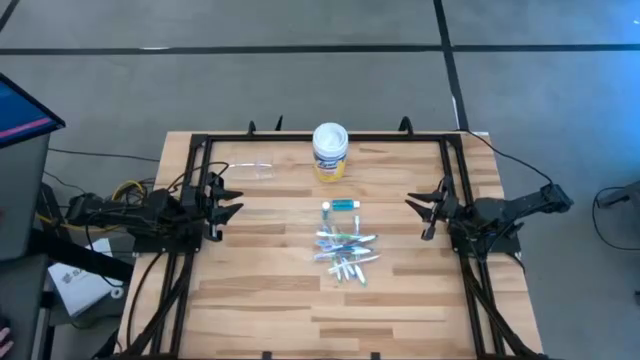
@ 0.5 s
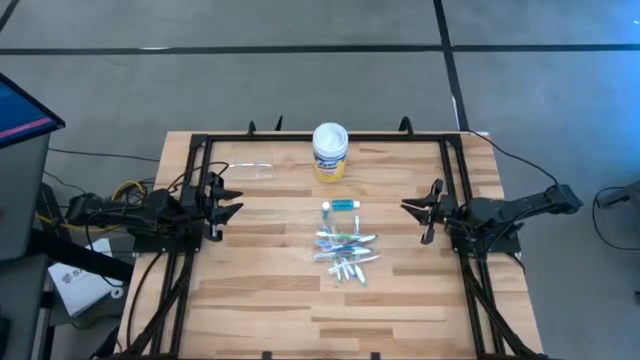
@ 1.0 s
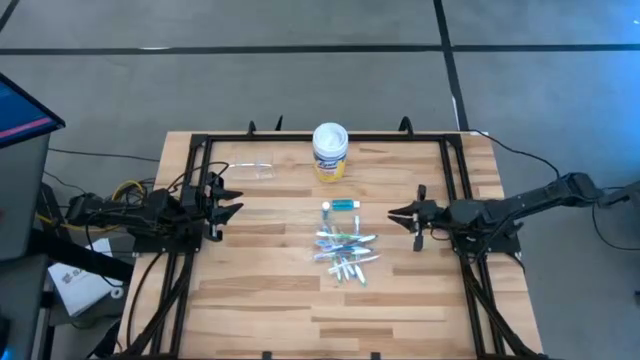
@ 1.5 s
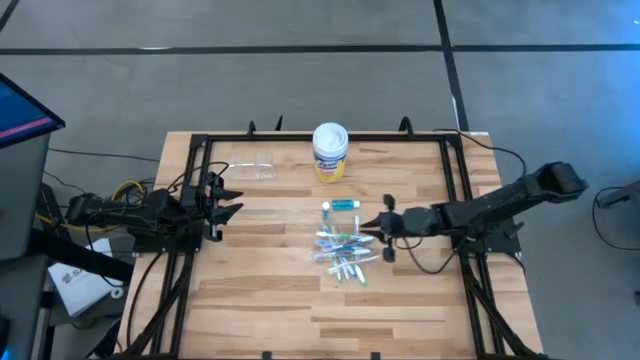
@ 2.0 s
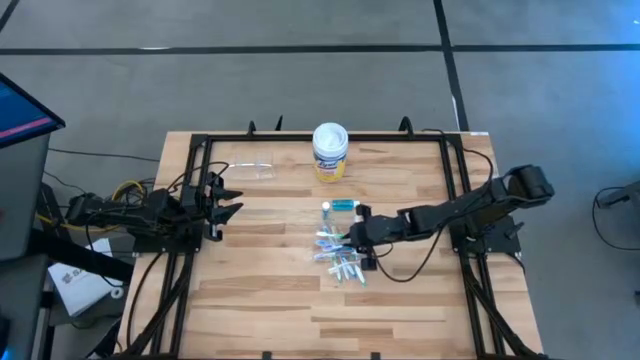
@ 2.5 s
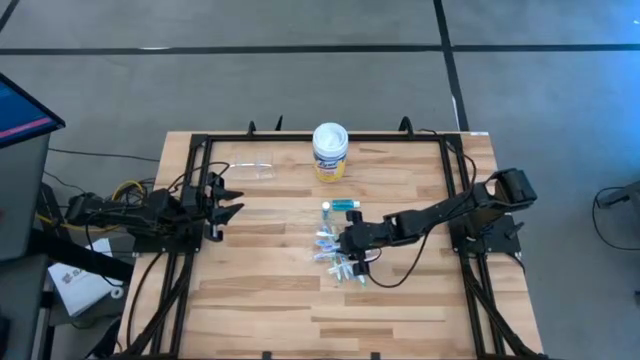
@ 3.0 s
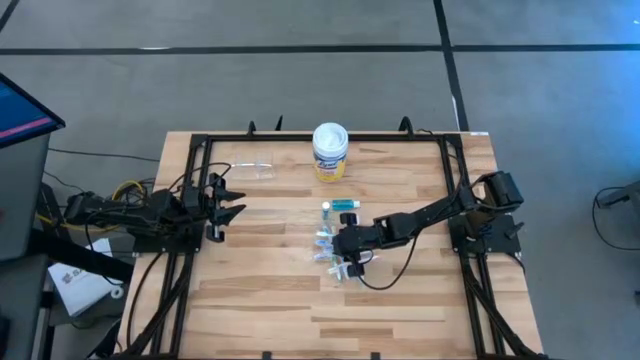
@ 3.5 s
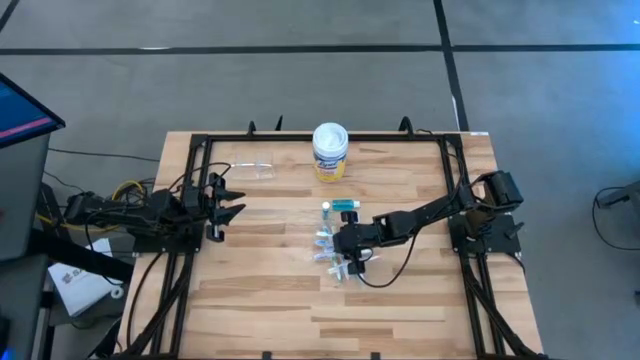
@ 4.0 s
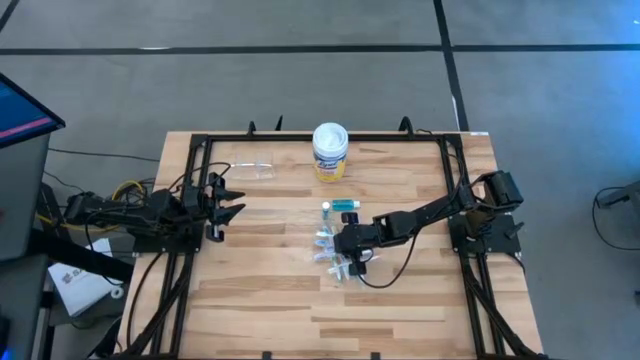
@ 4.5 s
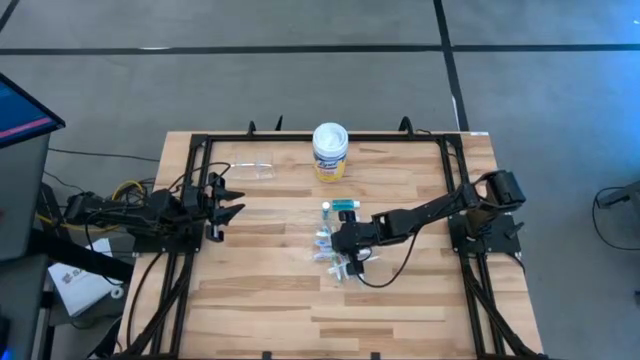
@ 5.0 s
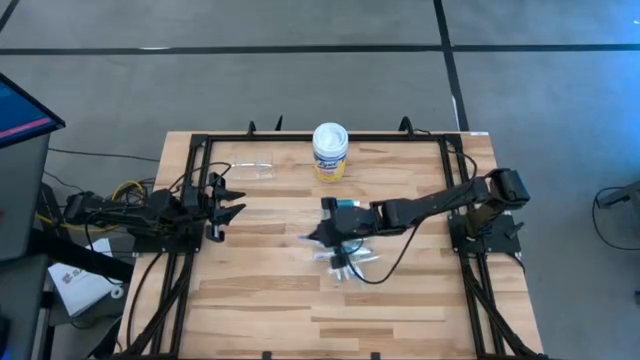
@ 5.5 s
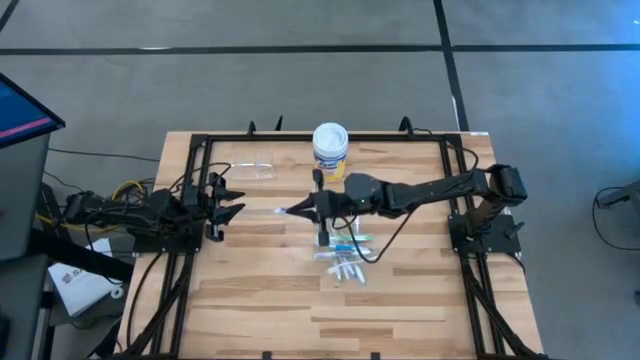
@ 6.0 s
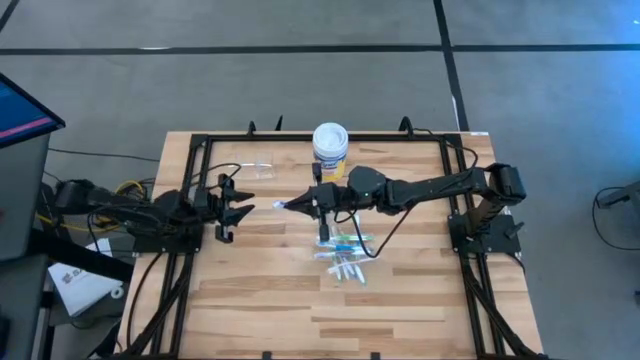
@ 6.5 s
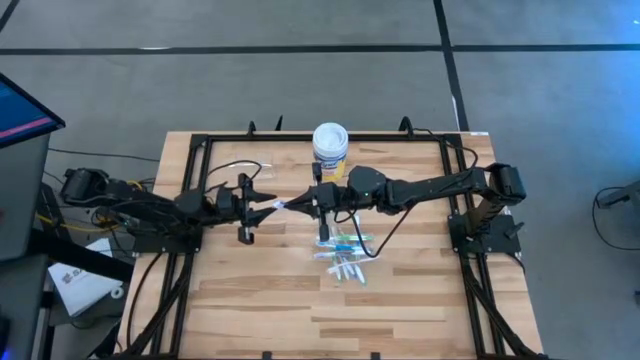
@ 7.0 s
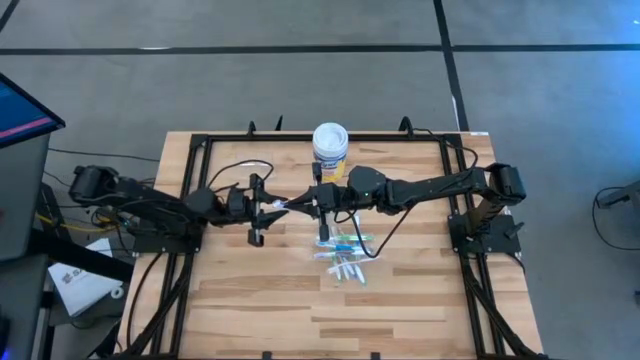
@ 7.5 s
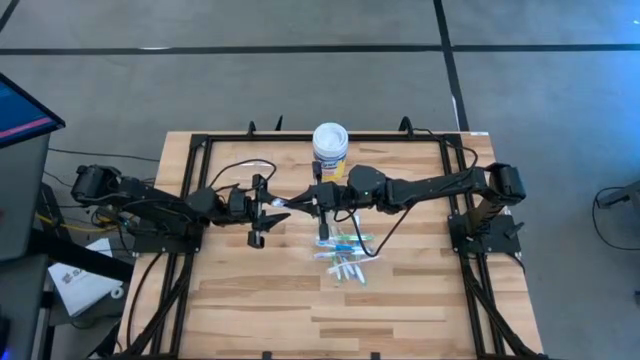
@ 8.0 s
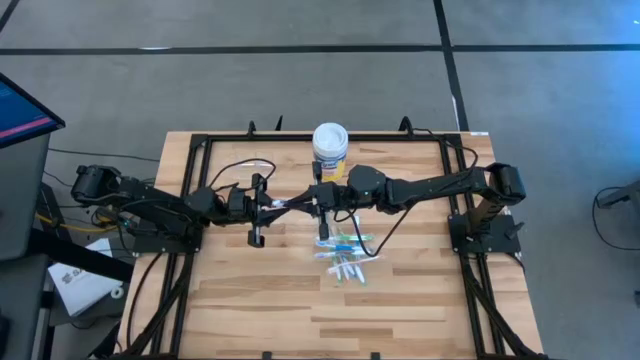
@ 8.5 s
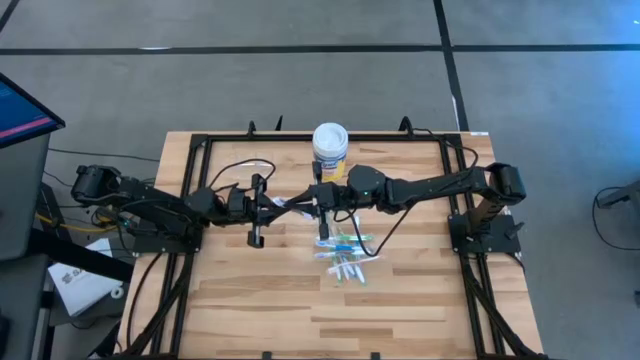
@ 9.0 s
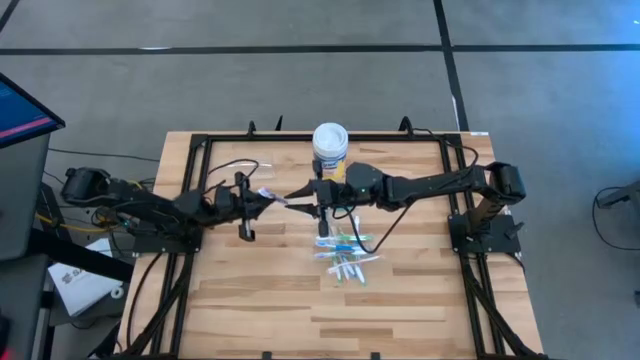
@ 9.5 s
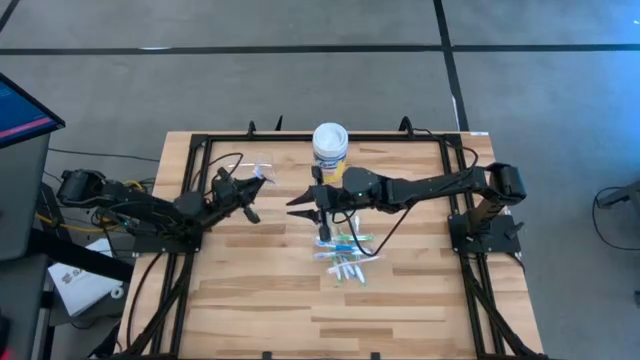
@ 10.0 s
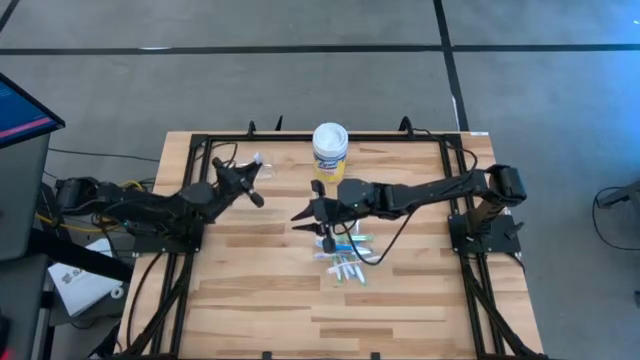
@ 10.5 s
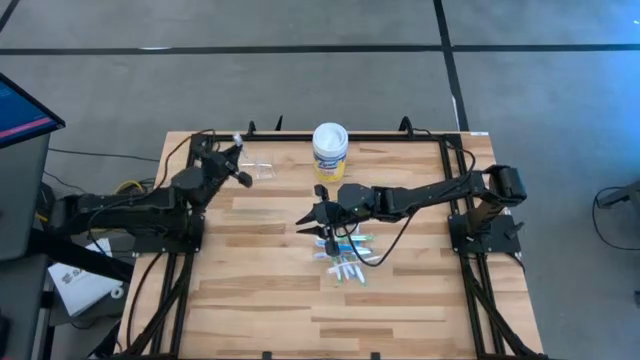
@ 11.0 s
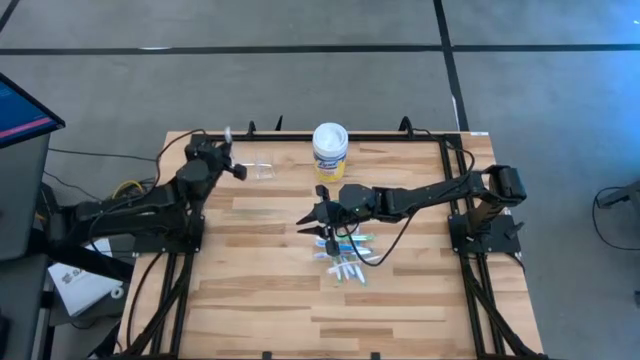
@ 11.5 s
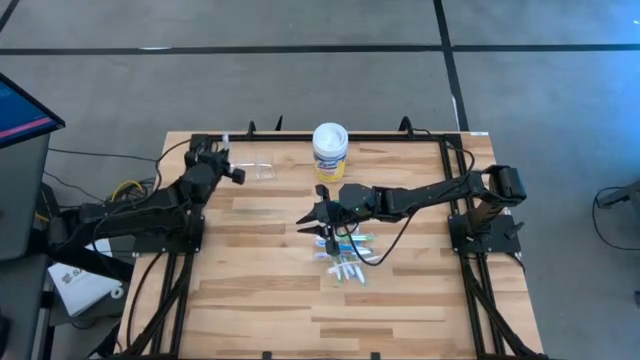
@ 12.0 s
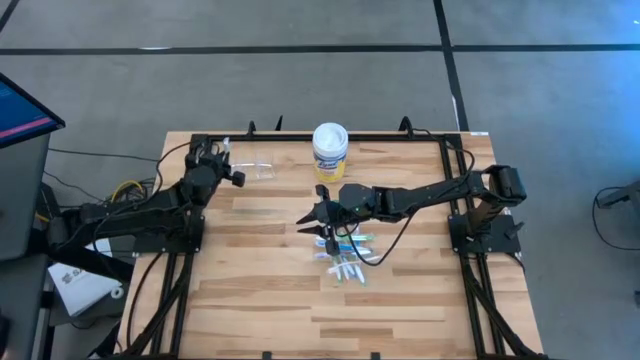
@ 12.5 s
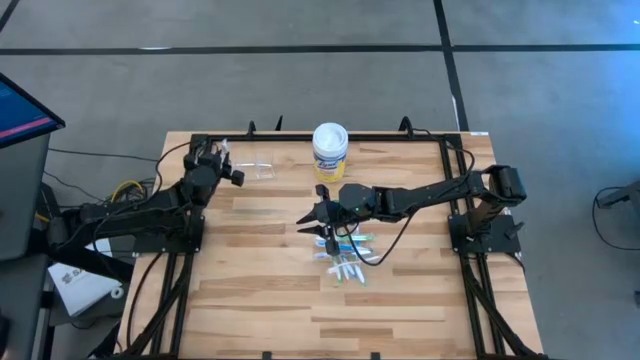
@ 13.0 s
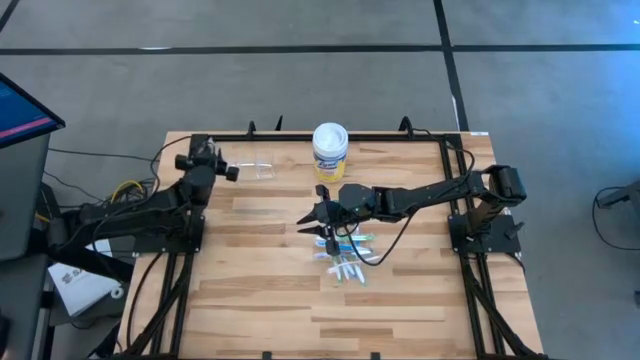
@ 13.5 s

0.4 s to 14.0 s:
Task: Pick & Place toothbrushing station
Put the violet toothbrush into the transparent organizer

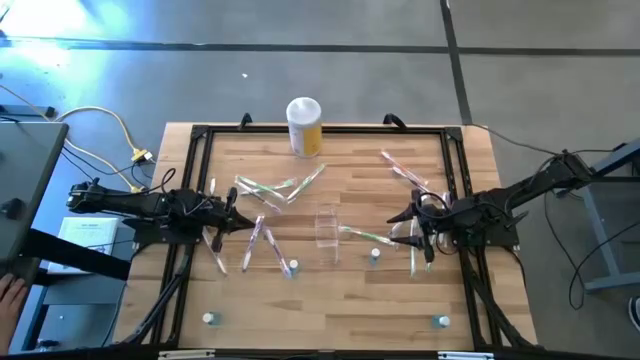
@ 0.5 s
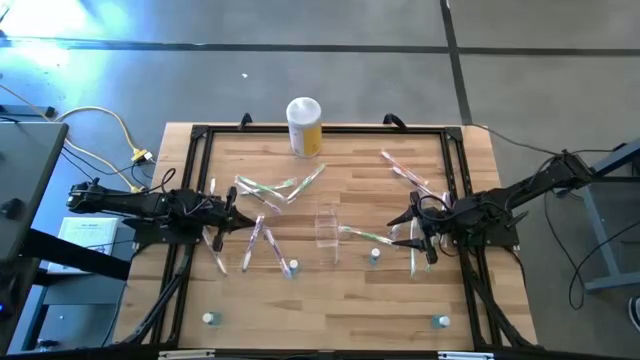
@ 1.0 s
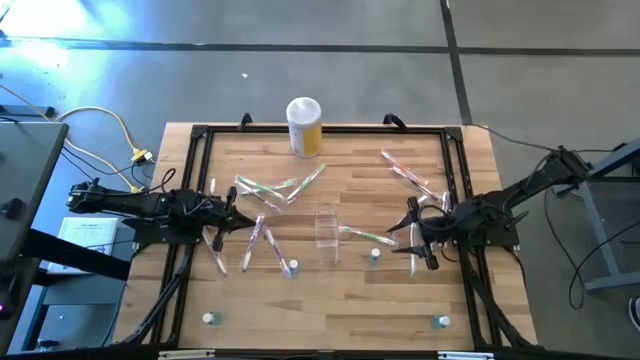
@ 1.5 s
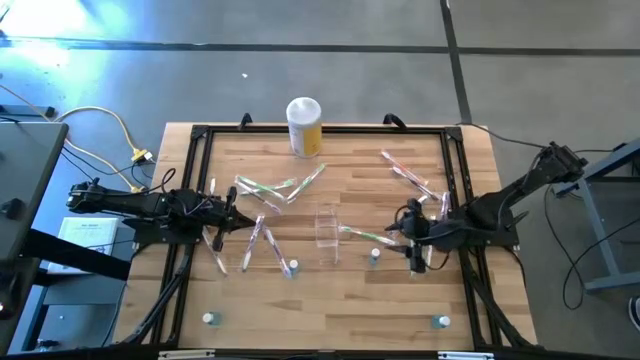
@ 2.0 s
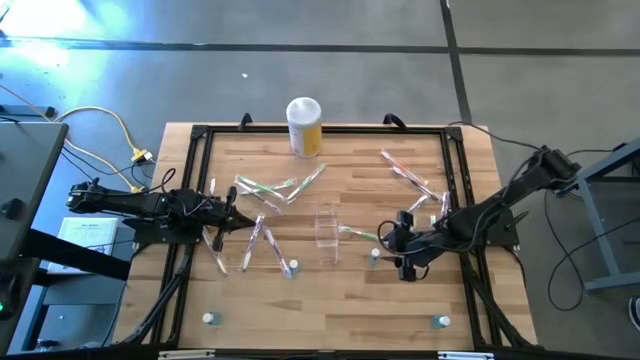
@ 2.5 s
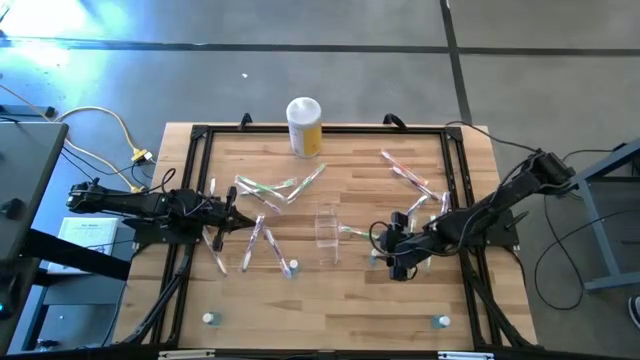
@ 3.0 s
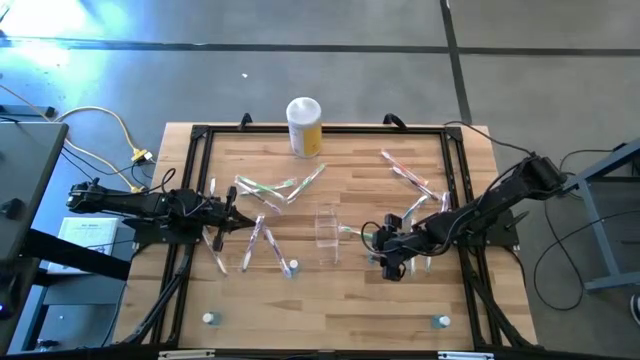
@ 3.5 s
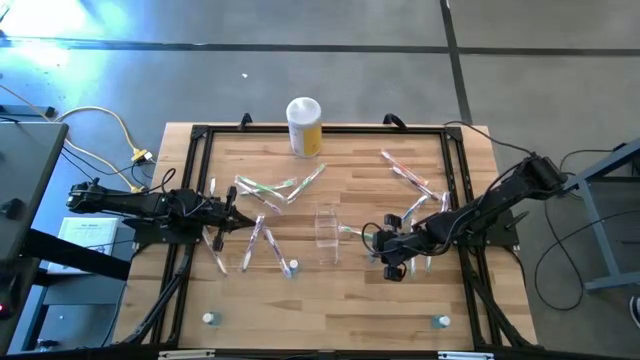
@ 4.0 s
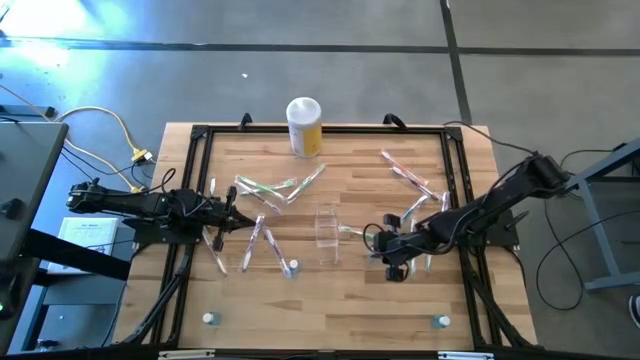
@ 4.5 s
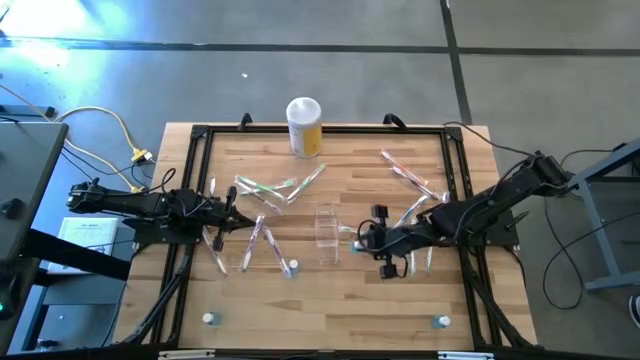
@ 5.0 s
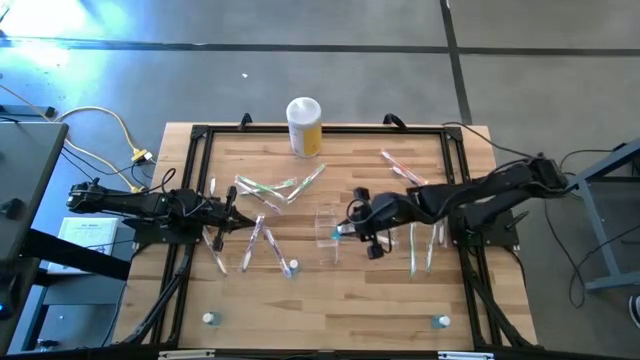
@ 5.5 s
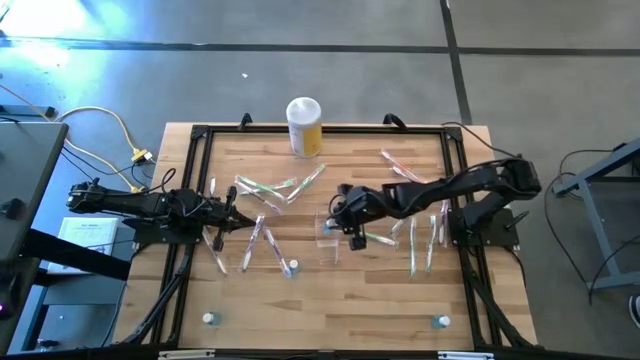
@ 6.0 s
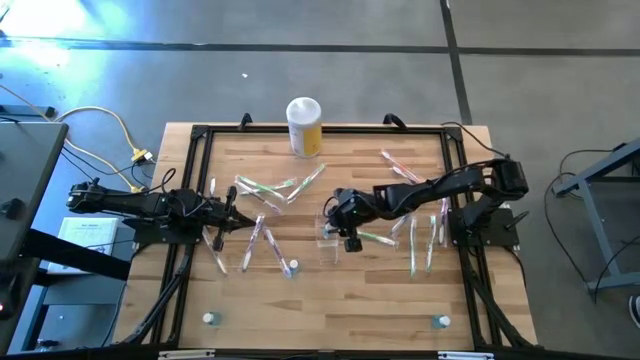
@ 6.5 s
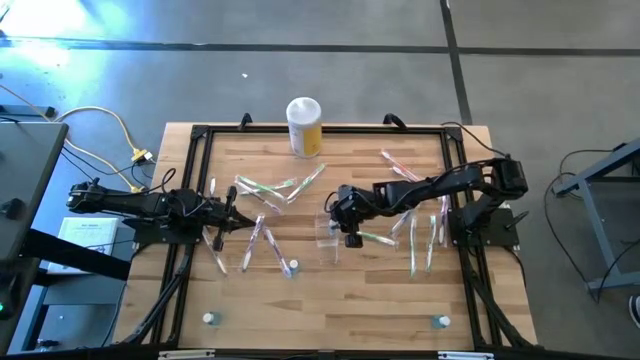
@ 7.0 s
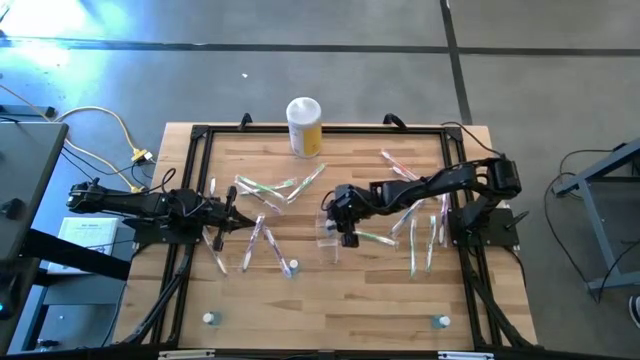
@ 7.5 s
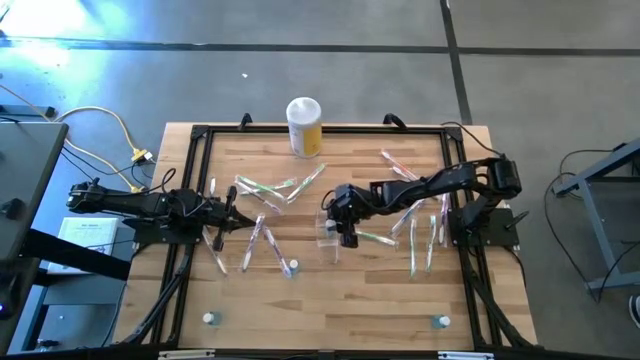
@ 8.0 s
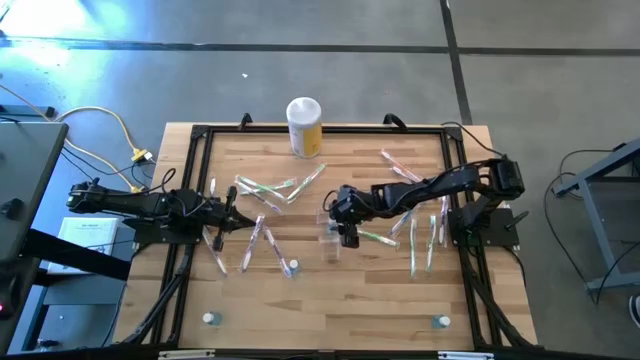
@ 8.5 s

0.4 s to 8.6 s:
Task: Pick & Place toothbrushing station
Put the mouthwash bottle into the transparent organizer
